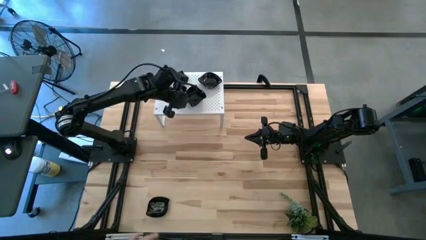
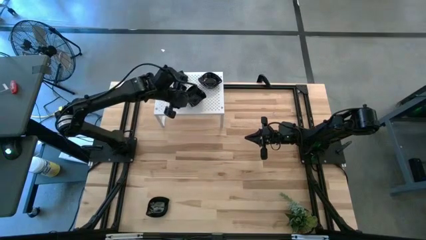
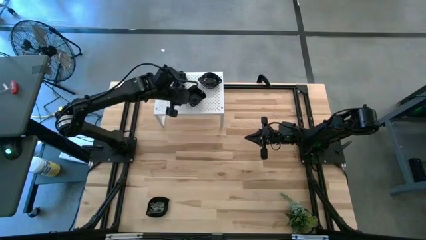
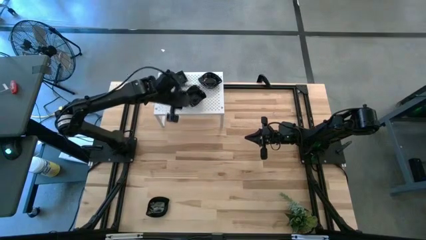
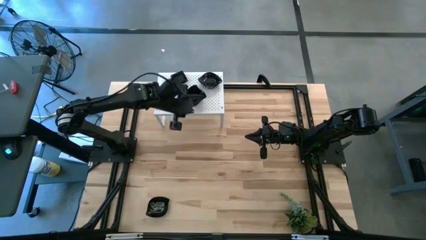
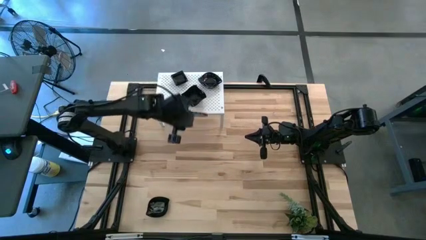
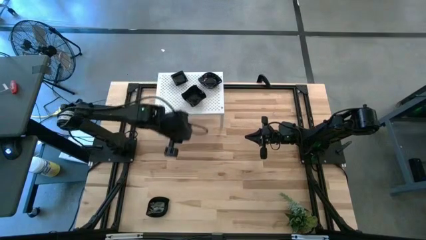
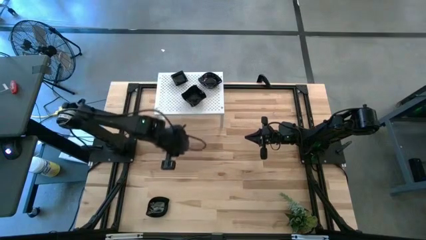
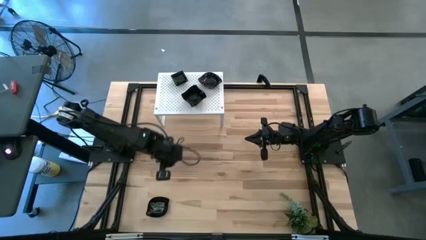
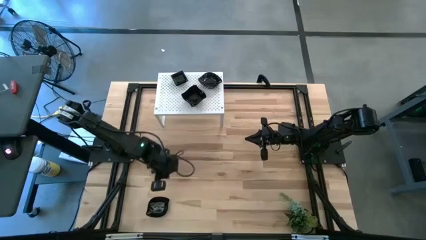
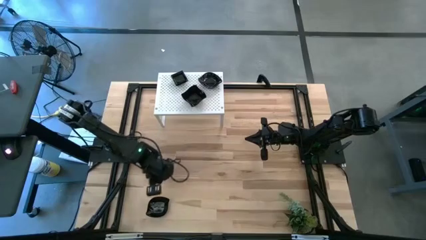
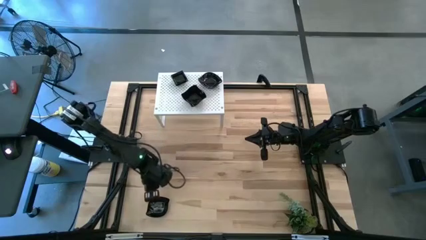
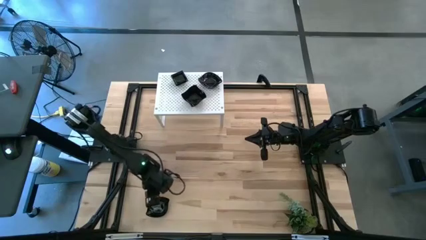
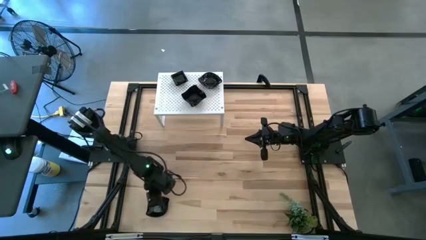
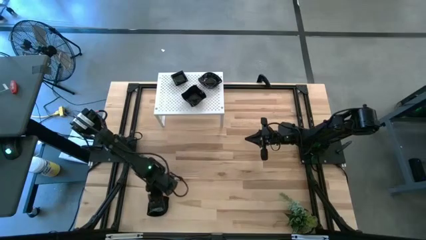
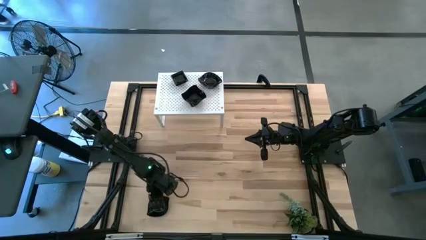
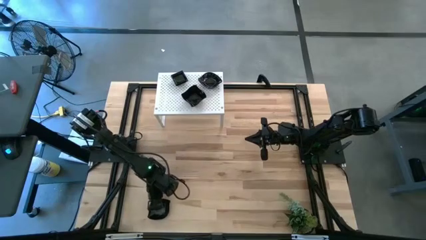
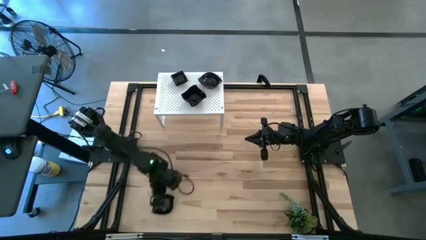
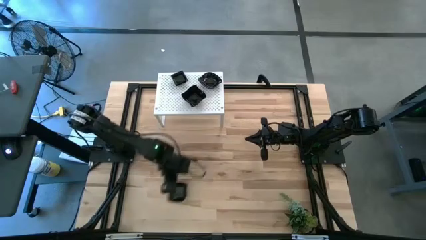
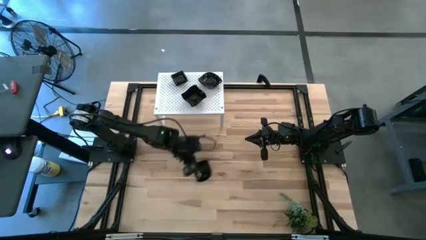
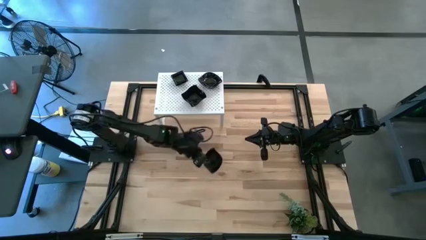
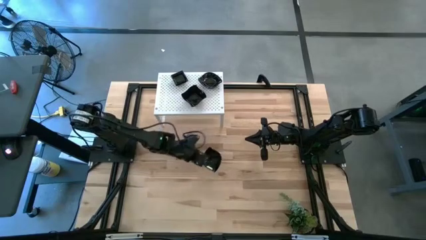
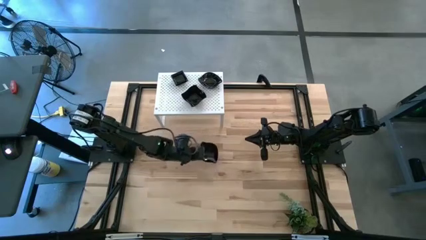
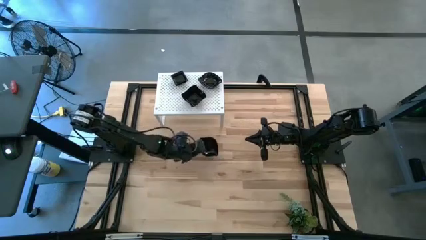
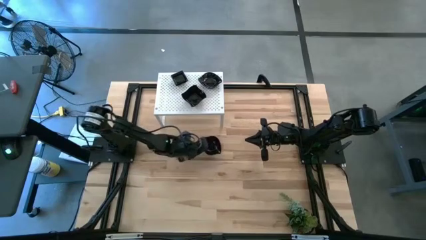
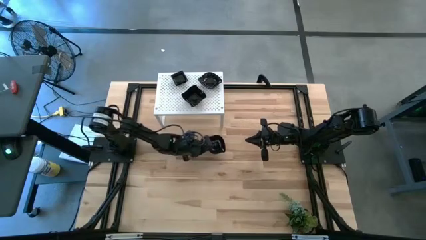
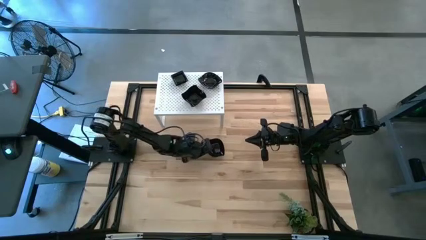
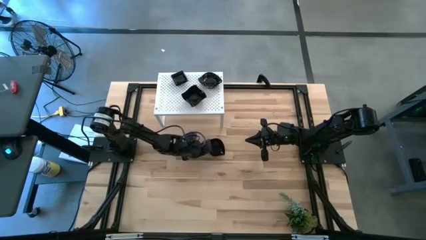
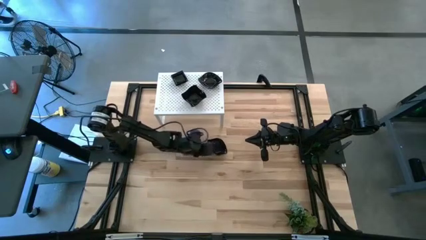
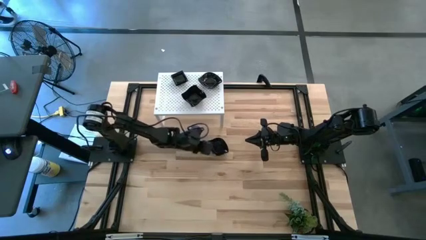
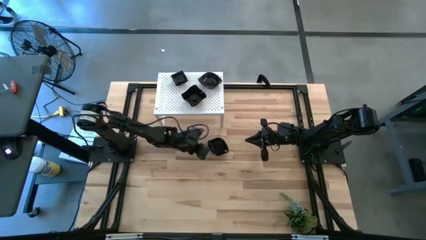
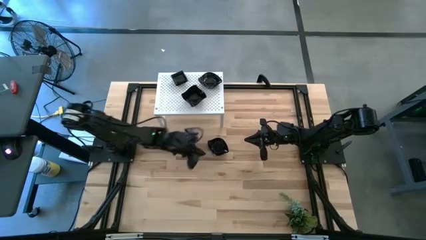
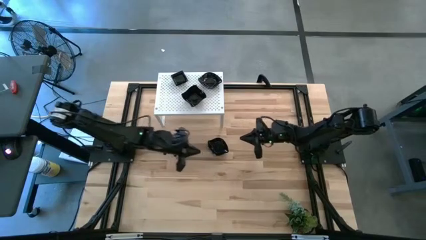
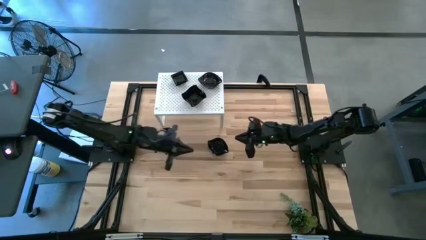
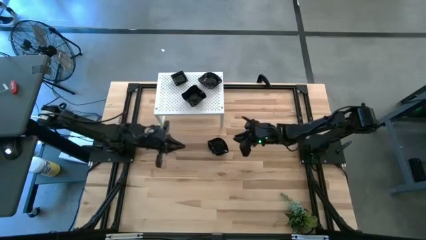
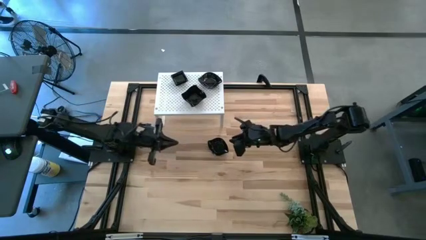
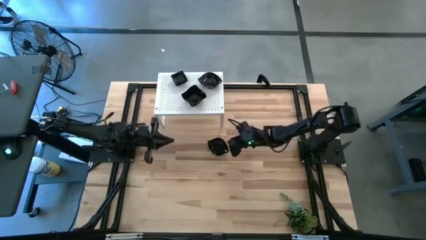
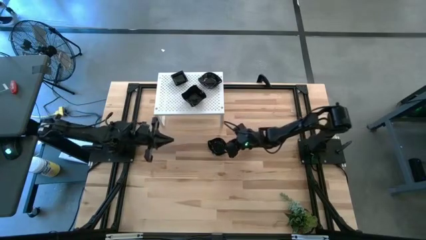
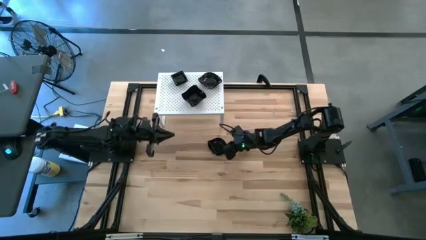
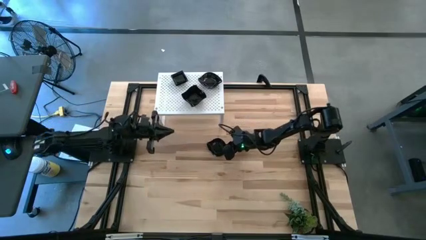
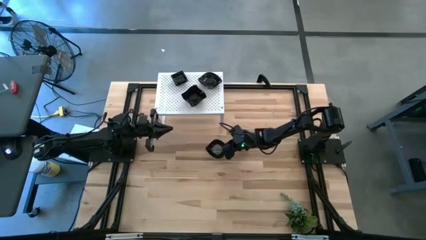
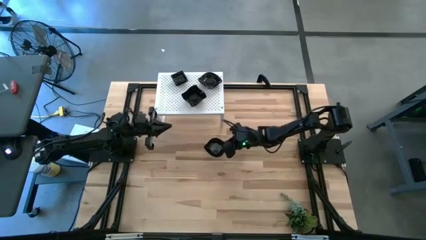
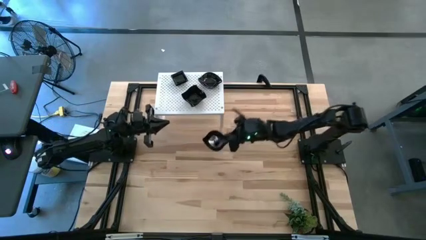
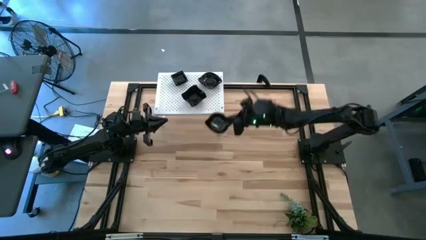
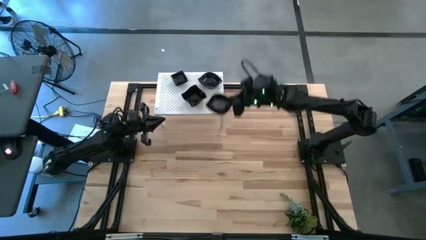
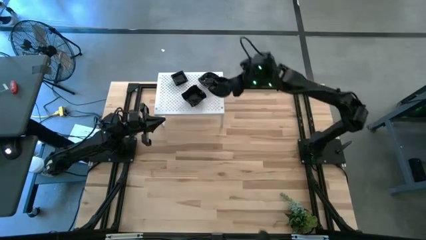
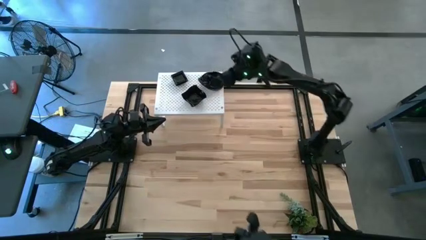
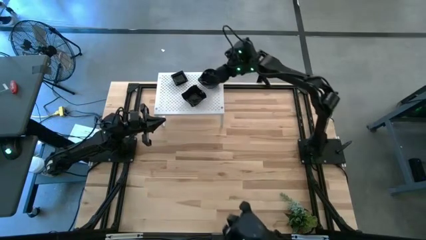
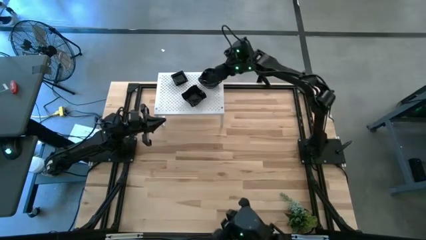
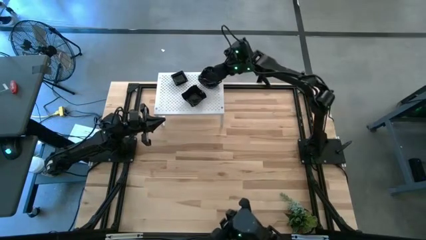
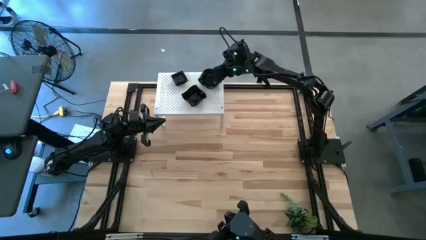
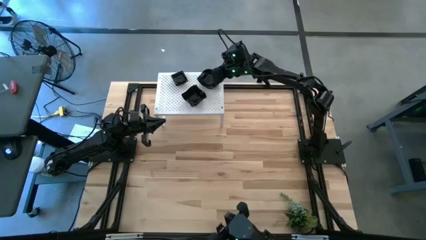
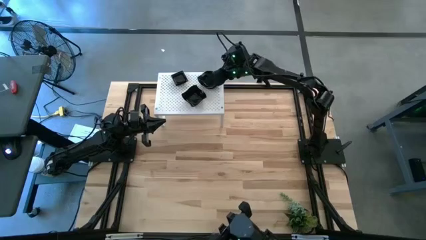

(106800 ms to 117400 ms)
Task: Pick & Place Mini shaped plates
Stack the black leaf-shaped plate on top of the black leaf-shaped plates on the shelf

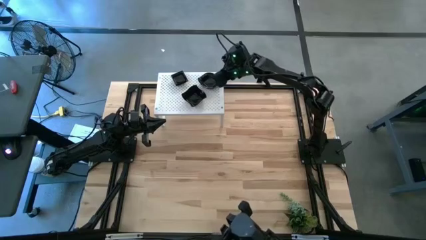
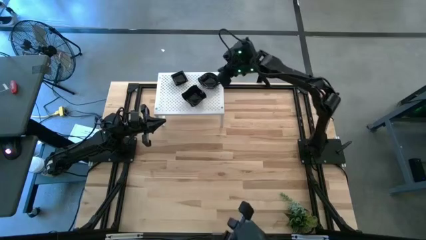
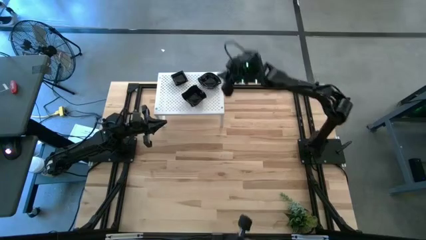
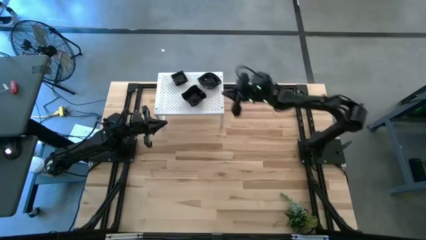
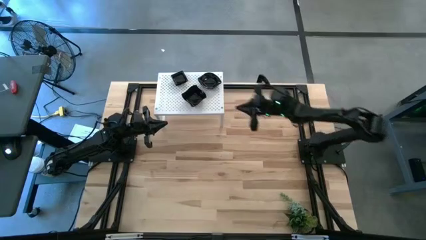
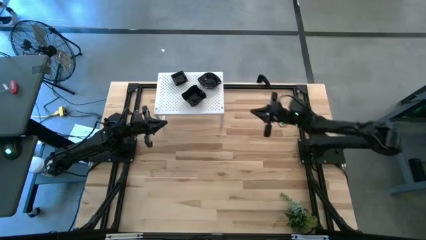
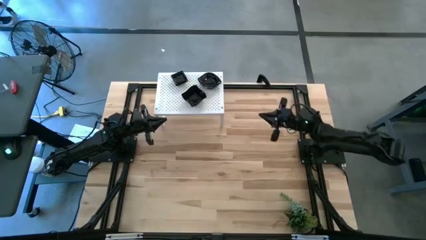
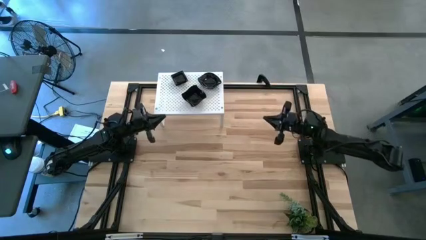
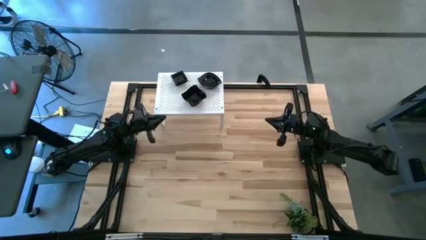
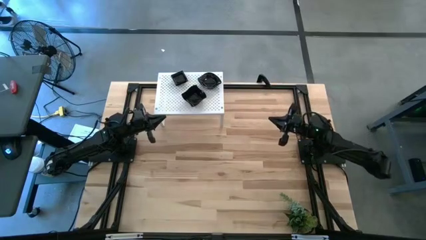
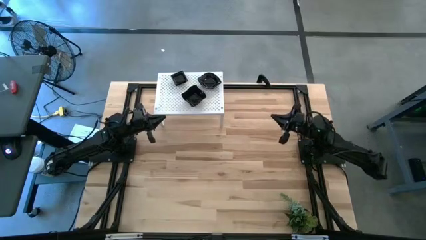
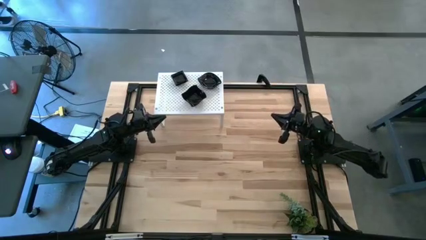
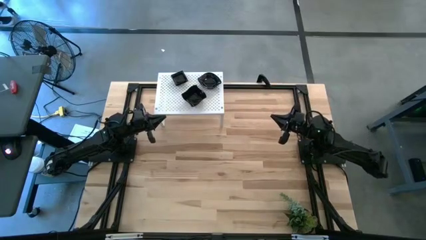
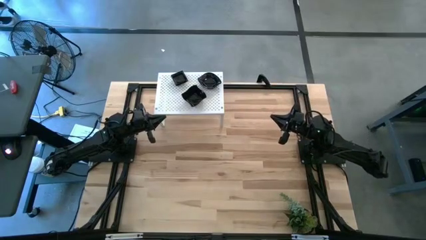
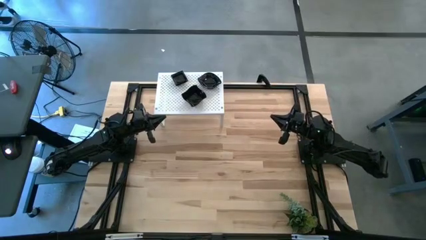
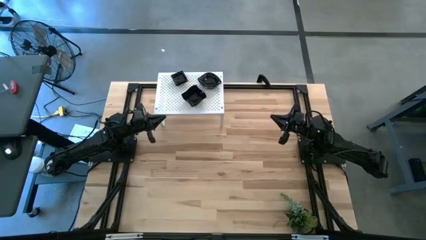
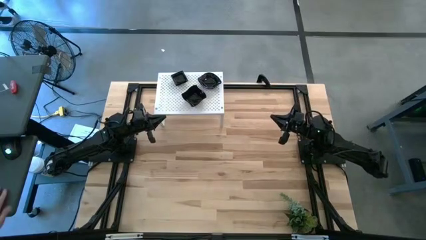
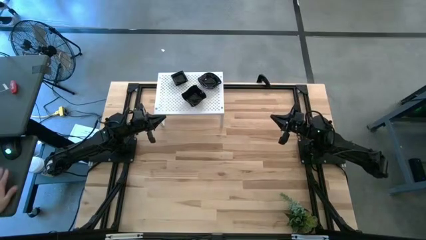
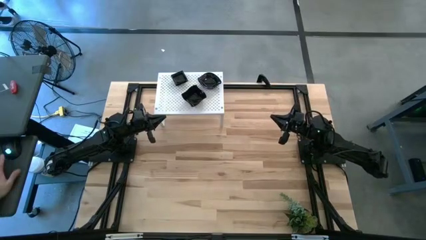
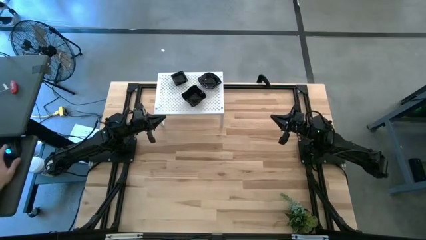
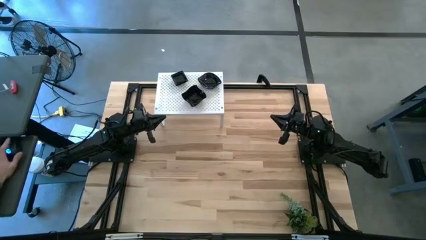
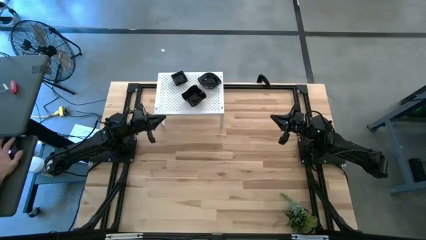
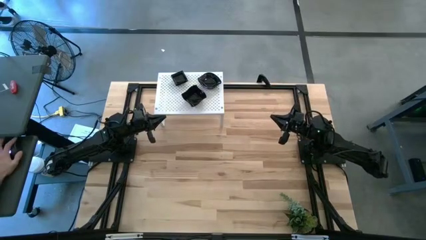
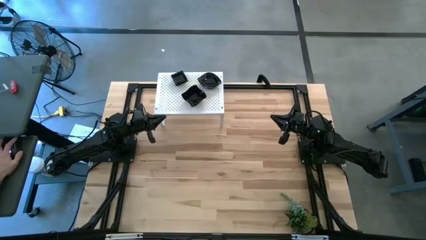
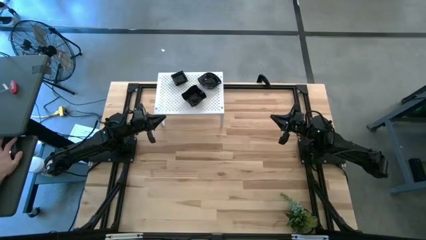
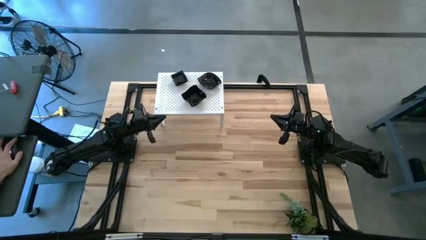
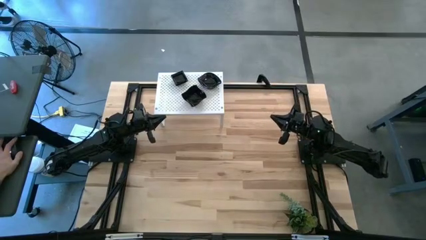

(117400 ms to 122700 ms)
Return to Home Position
